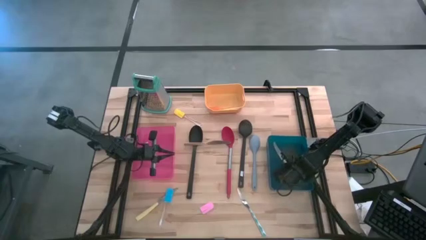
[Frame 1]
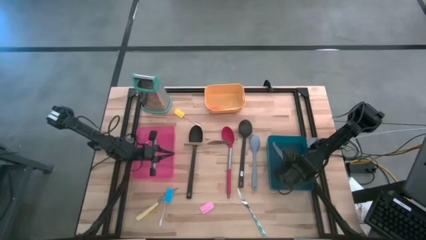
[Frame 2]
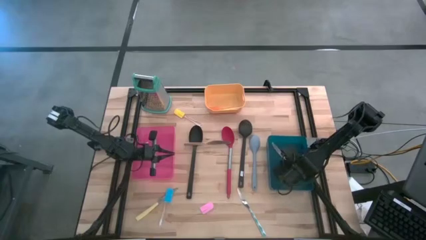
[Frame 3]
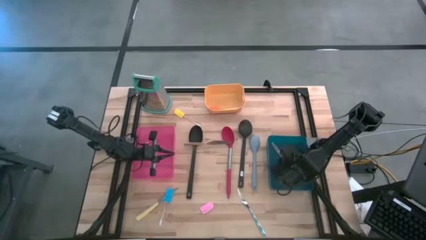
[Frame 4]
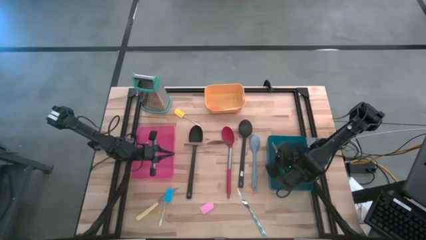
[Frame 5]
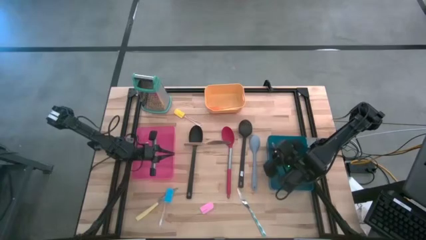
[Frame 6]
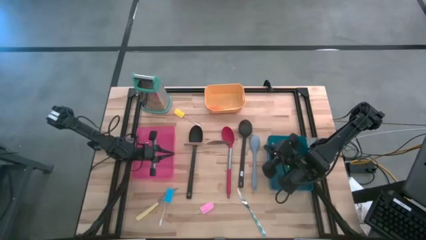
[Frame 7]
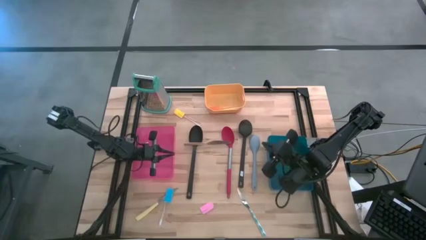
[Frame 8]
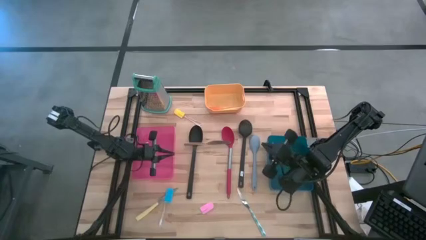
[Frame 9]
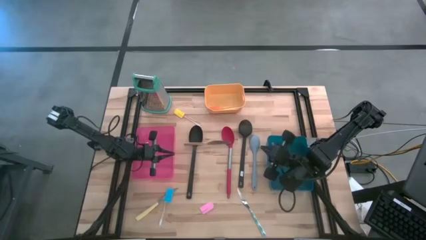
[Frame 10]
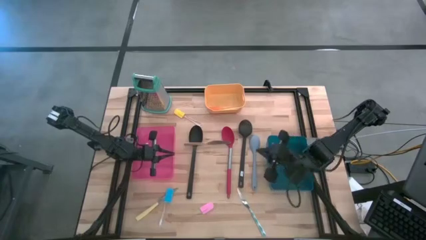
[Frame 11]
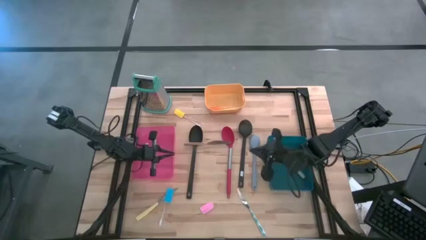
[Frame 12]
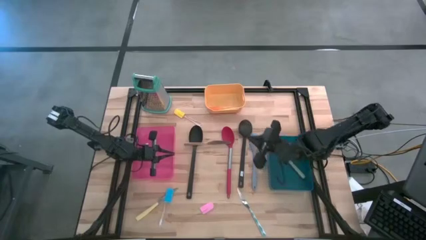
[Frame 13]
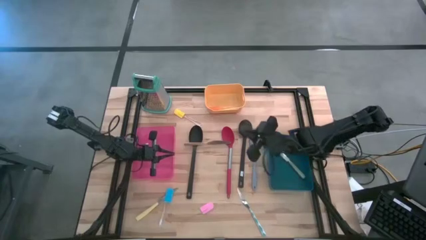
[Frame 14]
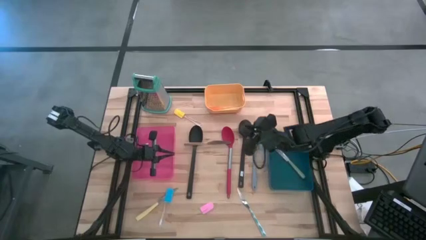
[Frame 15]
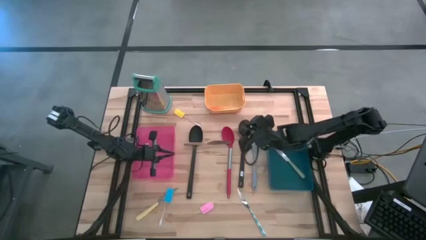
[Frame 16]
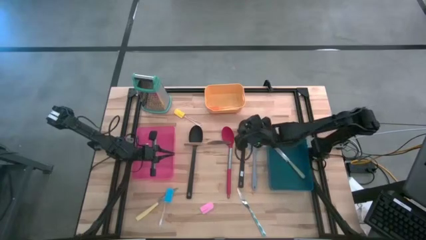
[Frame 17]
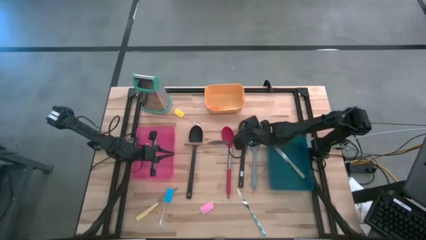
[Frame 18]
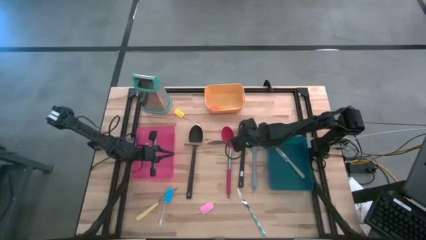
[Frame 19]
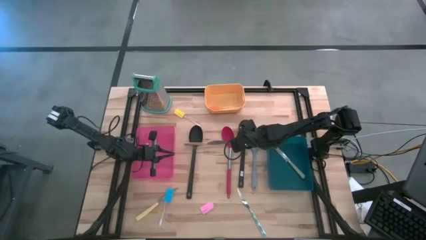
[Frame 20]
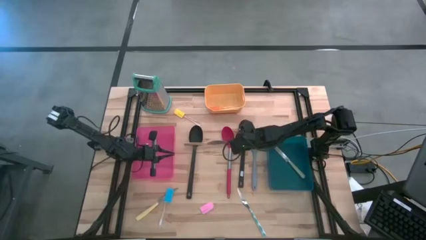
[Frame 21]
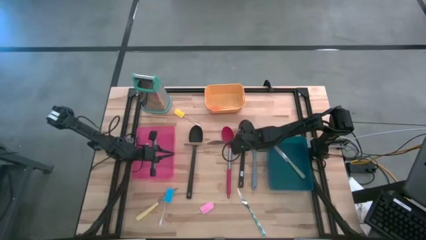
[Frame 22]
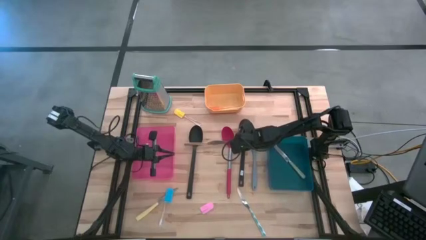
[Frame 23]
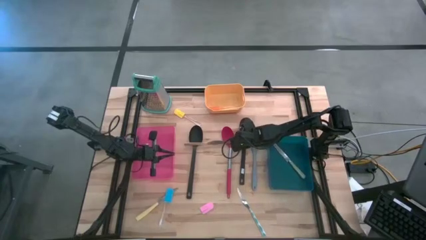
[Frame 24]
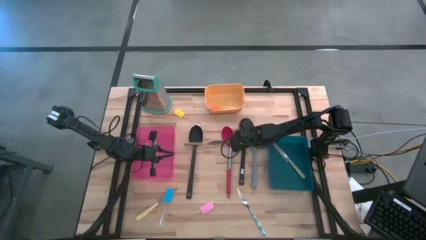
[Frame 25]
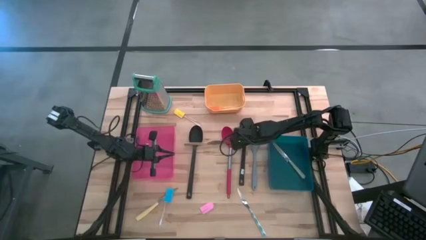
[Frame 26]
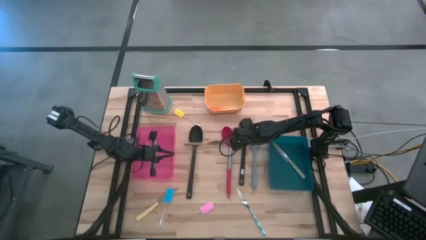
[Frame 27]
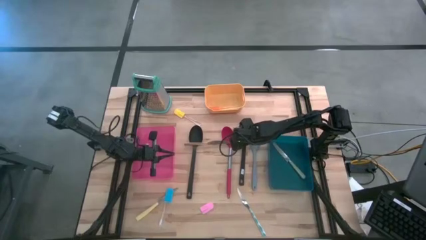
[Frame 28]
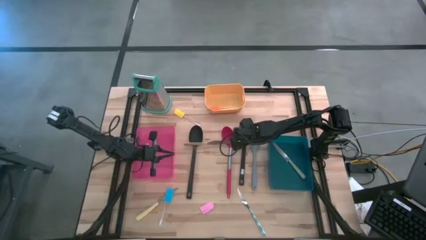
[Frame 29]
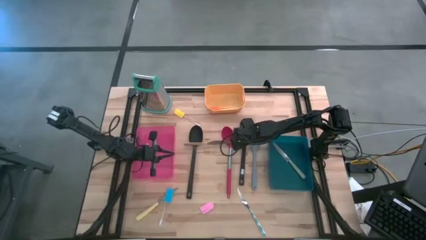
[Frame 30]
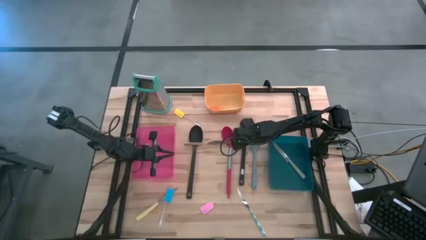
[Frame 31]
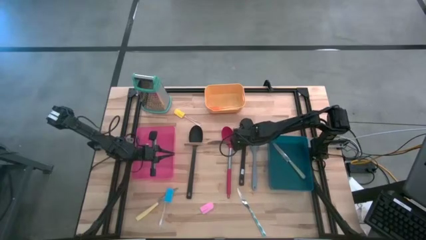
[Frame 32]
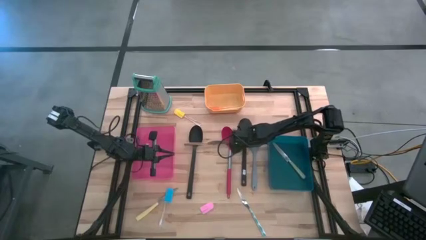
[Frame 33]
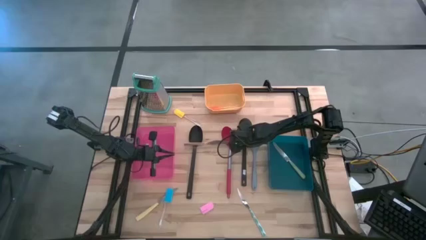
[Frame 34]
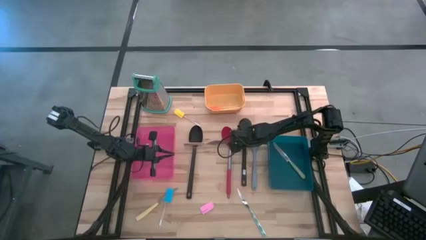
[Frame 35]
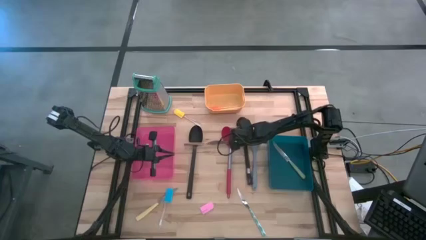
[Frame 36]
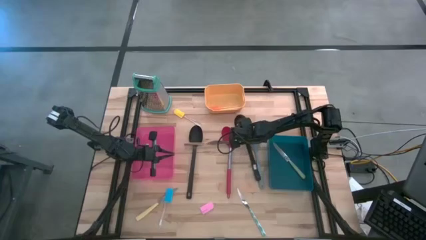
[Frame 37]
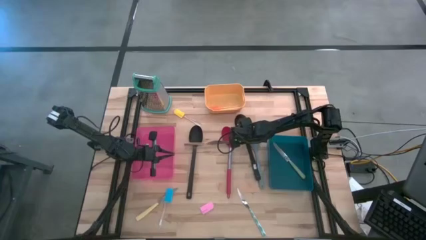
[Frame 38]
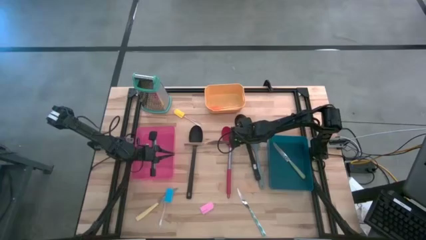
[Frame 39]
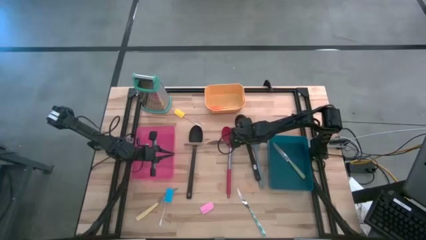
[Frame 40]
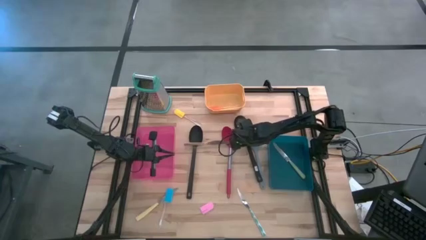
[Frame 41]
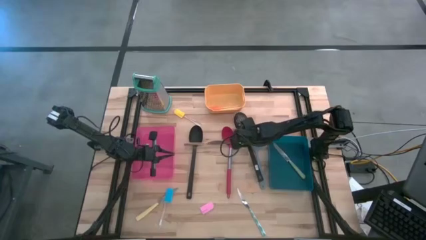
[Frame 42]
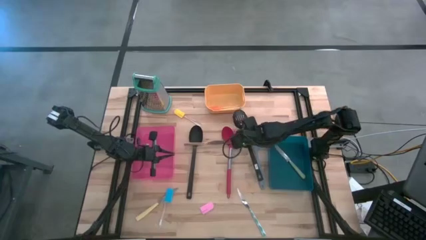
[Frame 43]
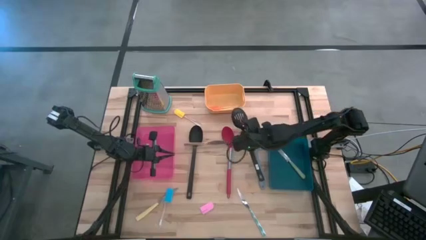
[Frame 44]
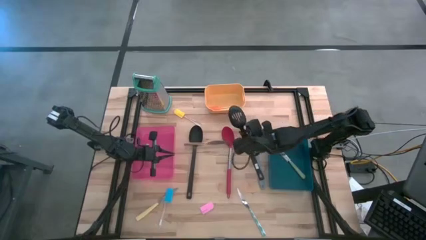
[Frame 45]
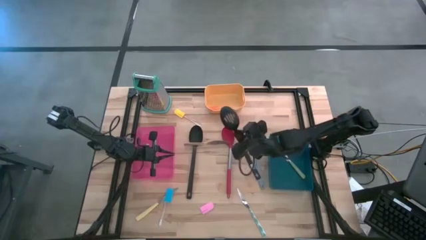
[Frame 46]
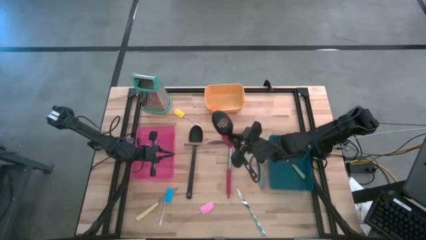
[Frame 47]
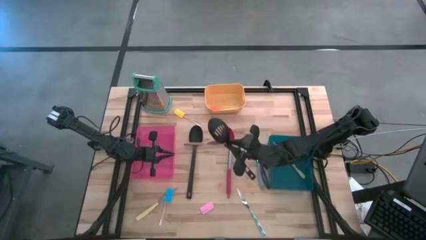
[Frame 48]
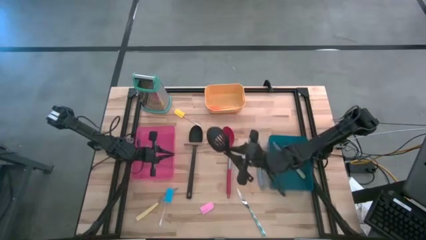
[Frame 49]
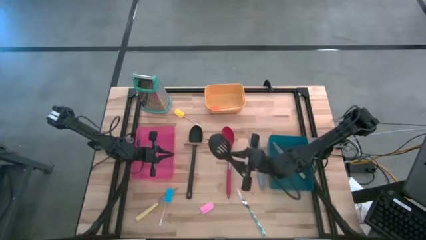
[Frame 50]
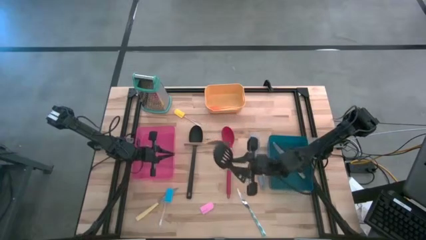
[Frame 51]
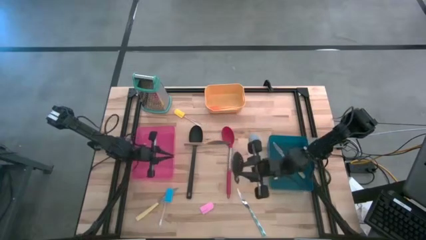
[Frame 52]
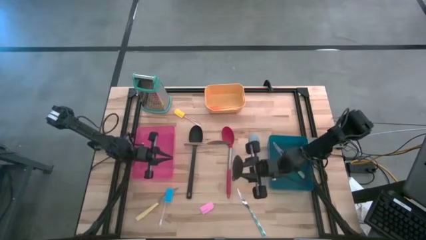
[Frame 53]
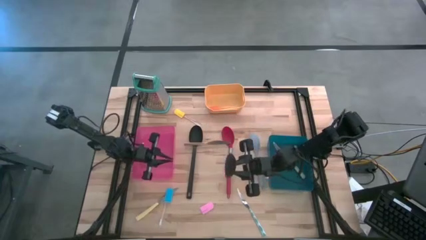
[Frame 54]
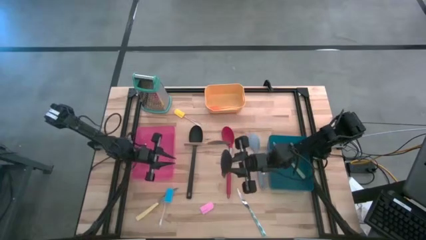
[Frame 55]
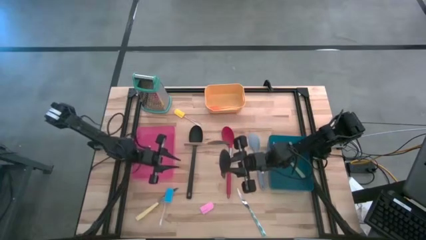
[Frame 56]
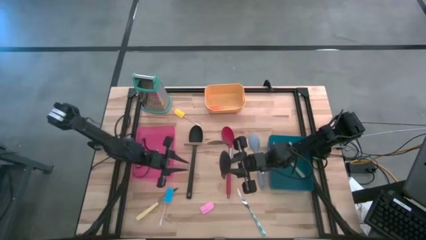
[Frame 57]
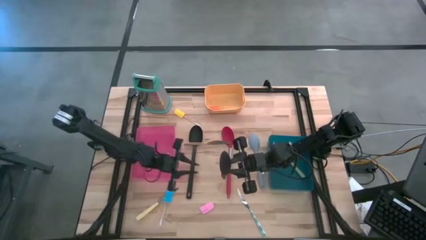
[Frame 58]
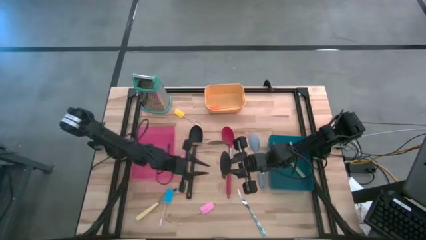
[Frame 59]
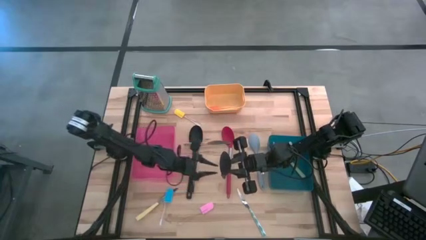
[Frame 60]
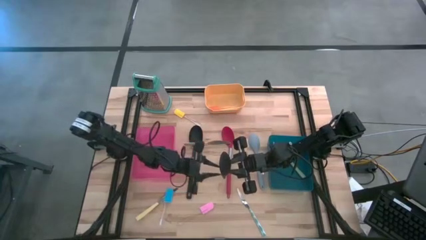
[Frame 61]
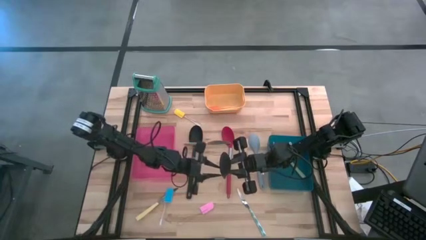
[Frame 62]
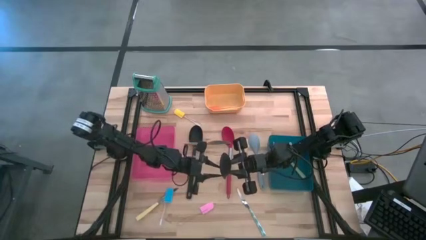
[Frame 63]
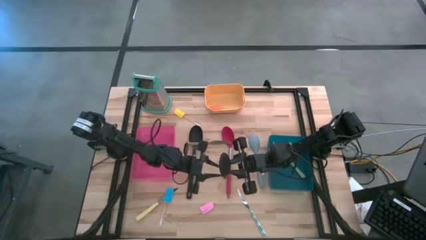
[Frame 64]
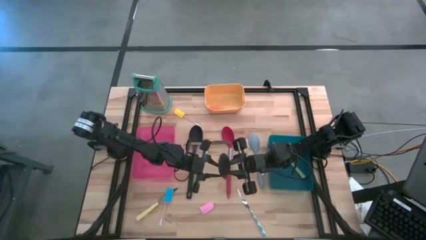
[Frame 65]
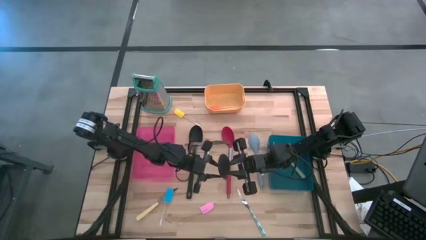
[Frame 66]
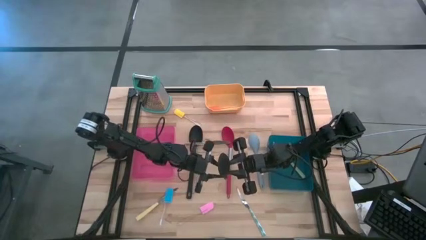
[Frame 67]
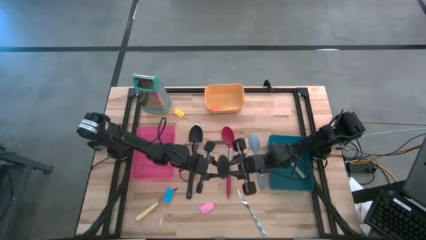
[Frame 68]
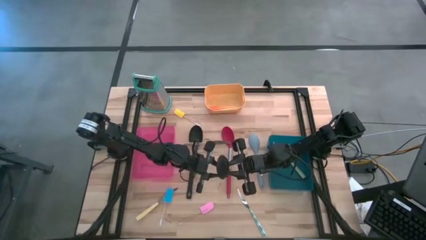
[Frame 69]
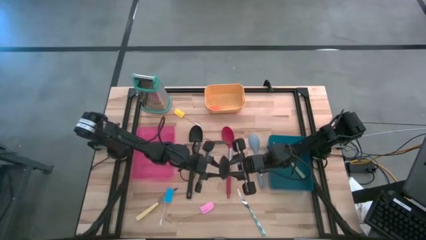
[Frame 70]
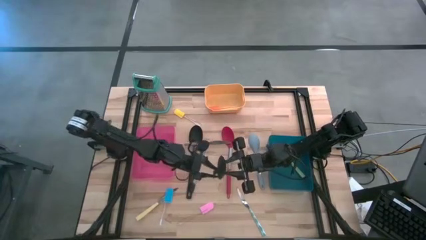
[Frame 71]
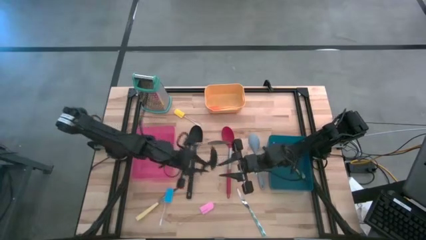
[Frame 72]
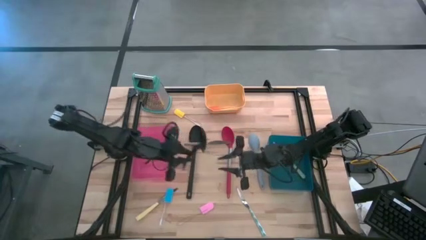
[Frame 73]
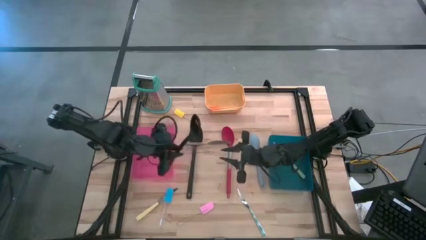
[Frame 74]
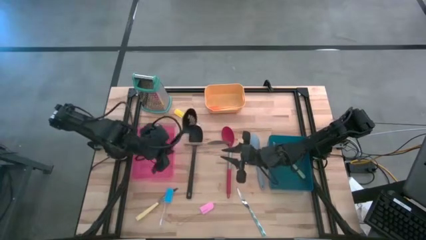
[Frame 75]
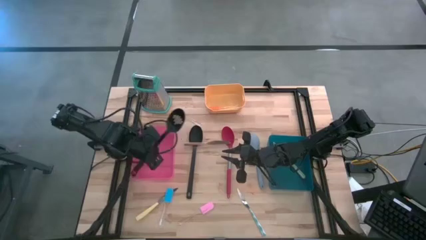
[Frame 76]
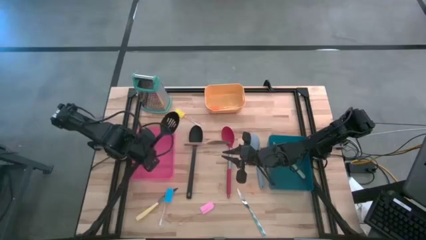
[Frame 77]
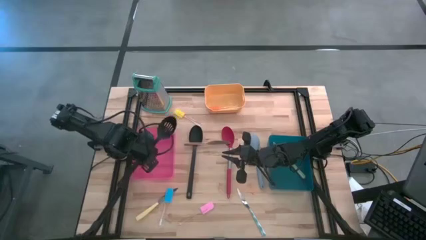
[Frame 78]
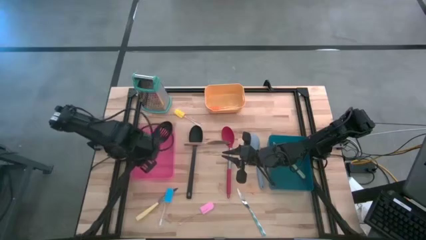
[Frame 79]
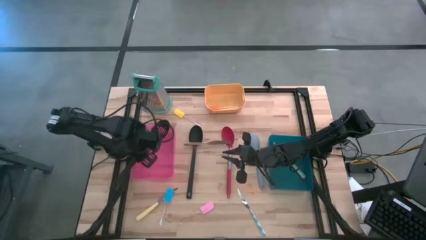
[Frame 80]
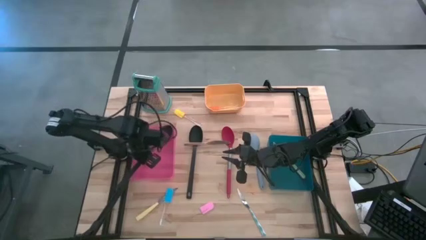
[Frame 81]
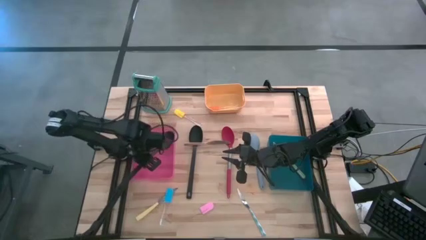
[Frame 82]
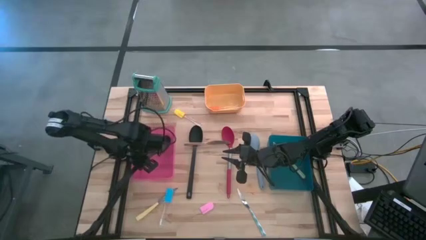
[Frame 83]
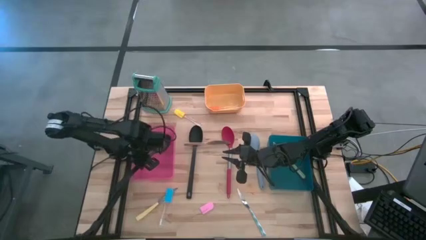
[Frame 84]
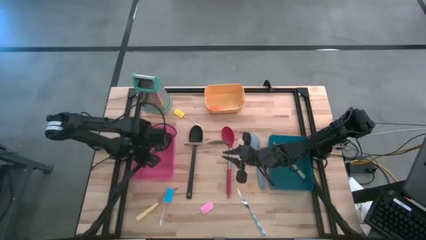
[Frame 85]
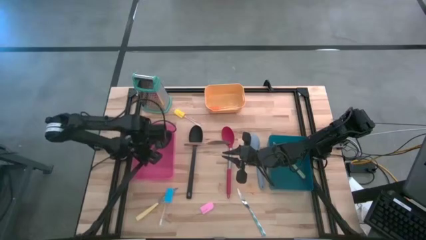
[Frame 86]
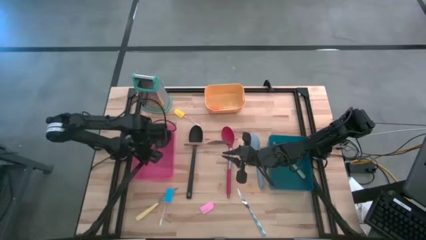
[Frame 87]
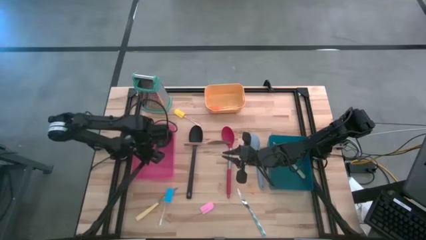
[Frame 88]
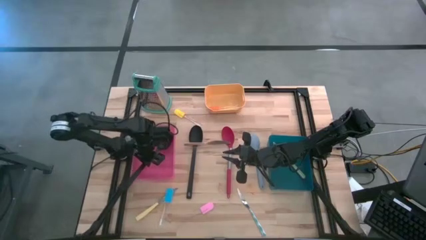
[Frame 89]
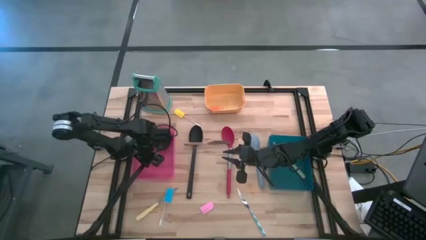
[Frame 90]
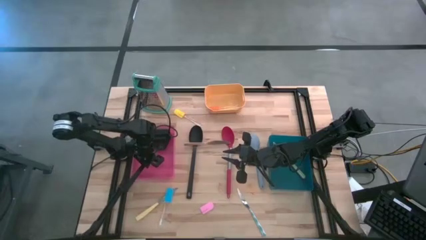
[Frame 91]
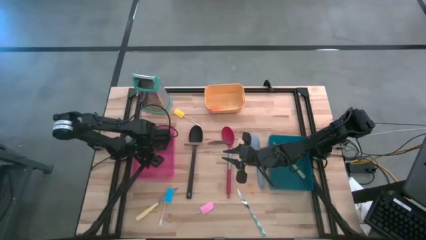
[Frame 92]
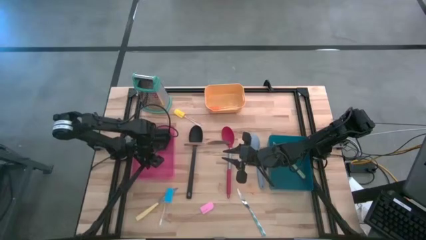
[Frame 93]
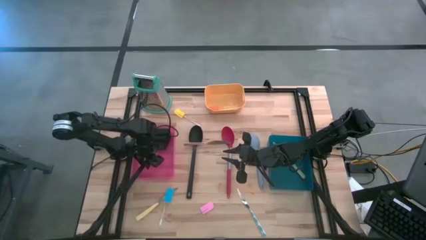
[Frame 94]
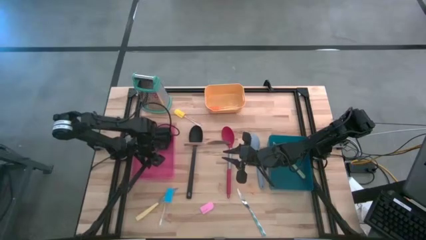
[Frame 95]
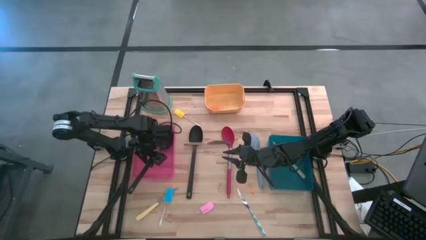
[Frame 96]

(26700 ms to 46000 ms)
Task: Pick & Place Kitchen Items
Put the right black serving spoon into the pink bin
